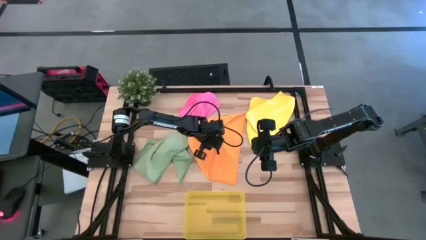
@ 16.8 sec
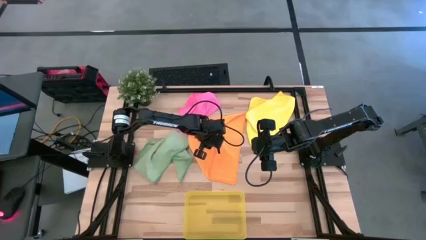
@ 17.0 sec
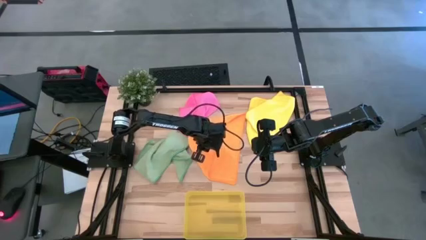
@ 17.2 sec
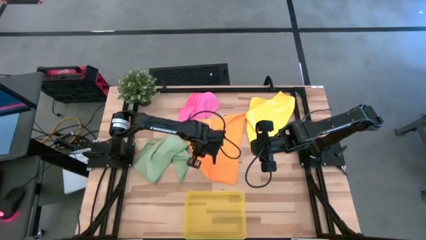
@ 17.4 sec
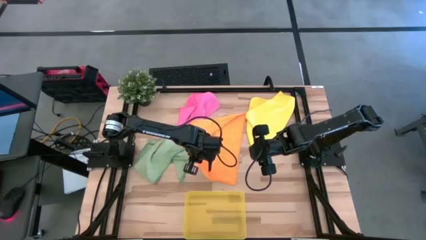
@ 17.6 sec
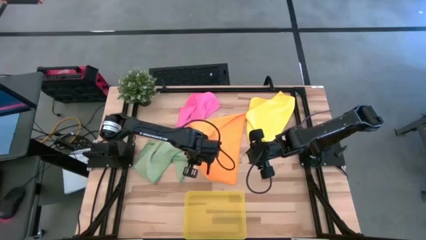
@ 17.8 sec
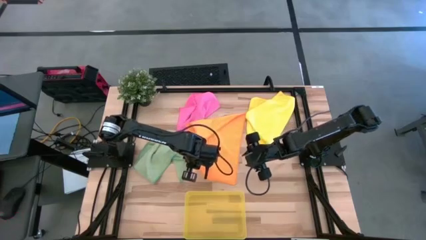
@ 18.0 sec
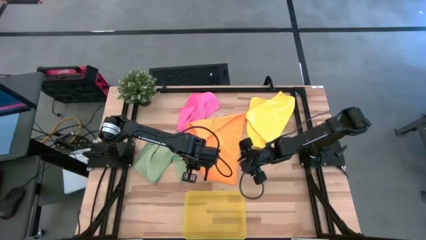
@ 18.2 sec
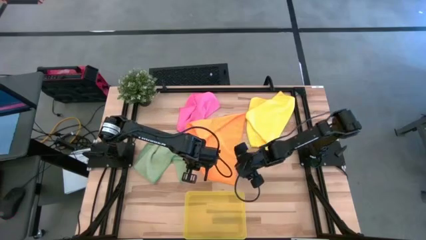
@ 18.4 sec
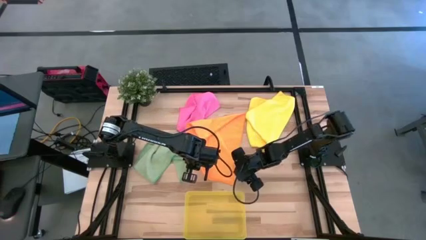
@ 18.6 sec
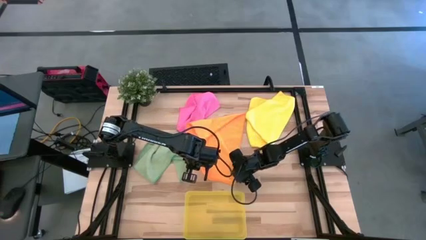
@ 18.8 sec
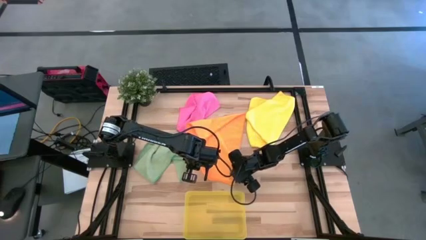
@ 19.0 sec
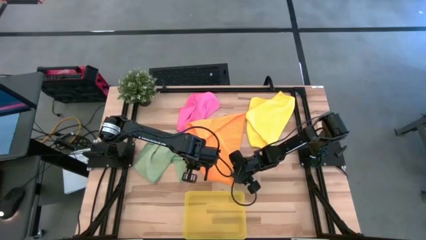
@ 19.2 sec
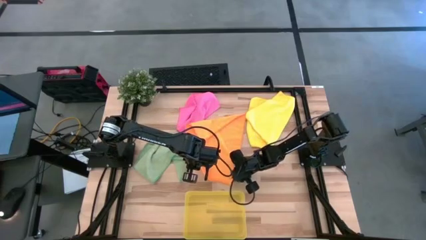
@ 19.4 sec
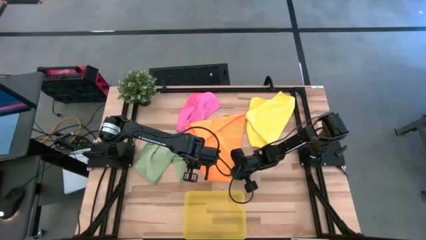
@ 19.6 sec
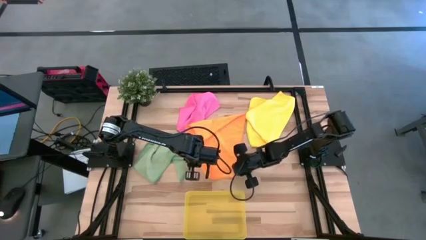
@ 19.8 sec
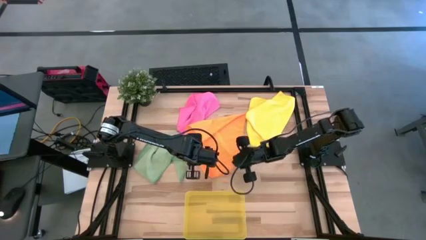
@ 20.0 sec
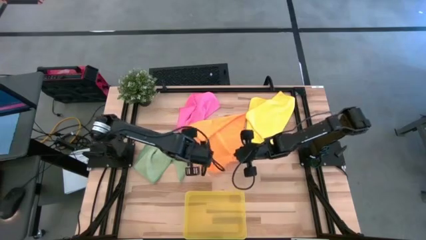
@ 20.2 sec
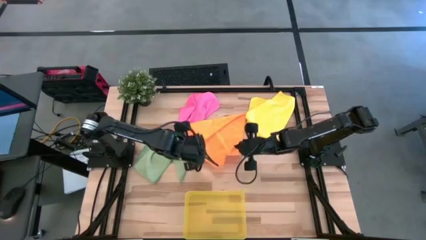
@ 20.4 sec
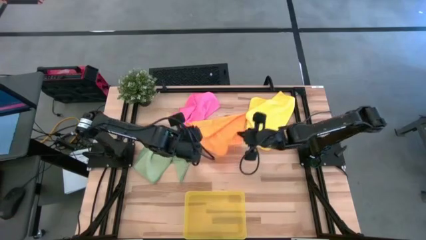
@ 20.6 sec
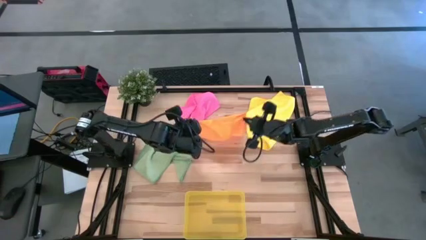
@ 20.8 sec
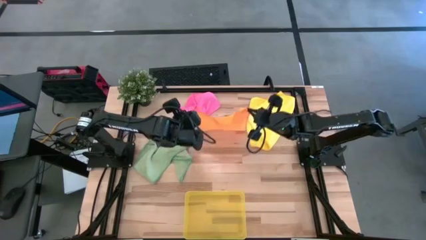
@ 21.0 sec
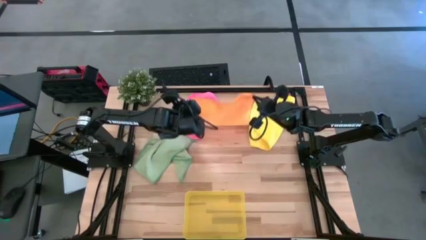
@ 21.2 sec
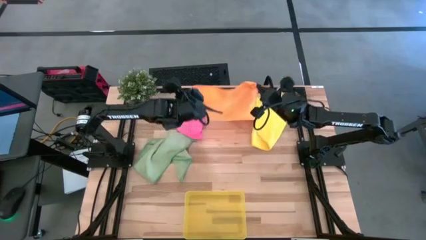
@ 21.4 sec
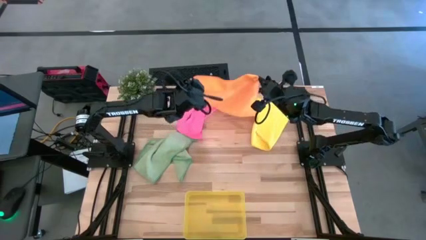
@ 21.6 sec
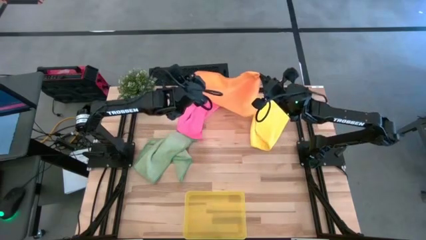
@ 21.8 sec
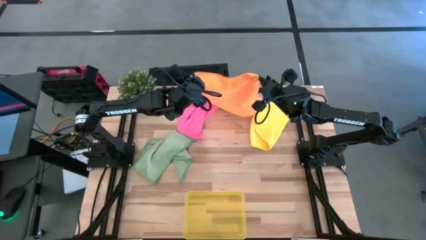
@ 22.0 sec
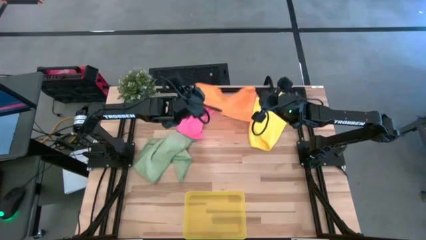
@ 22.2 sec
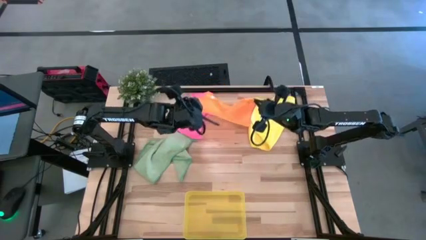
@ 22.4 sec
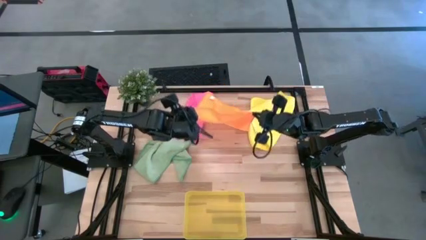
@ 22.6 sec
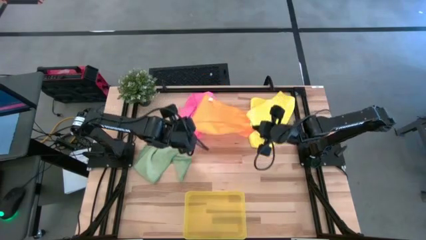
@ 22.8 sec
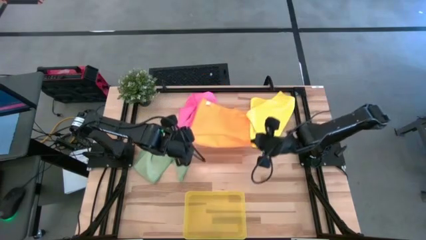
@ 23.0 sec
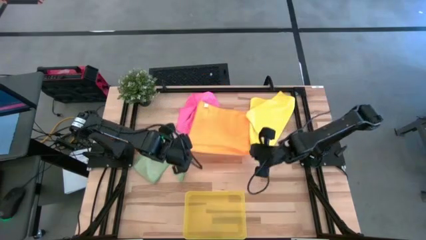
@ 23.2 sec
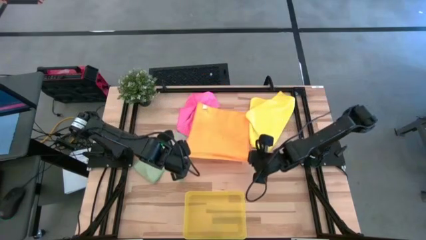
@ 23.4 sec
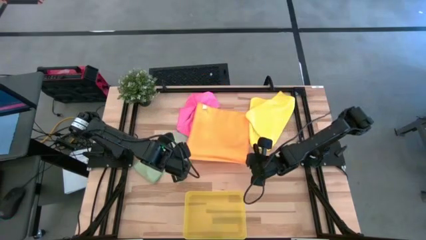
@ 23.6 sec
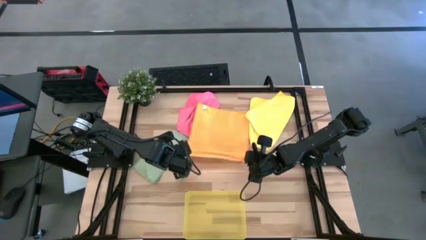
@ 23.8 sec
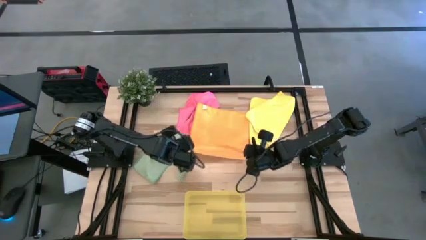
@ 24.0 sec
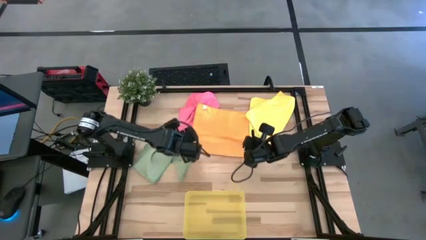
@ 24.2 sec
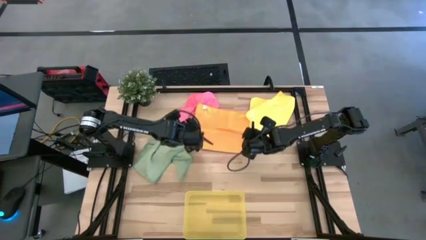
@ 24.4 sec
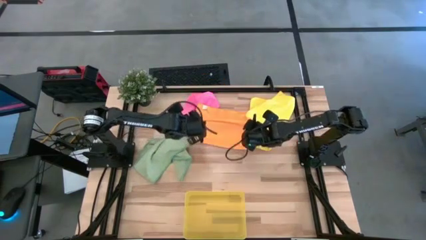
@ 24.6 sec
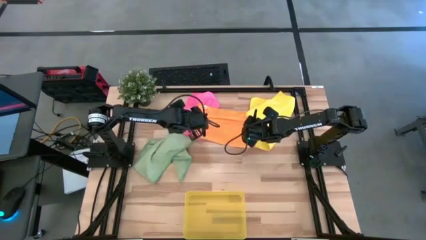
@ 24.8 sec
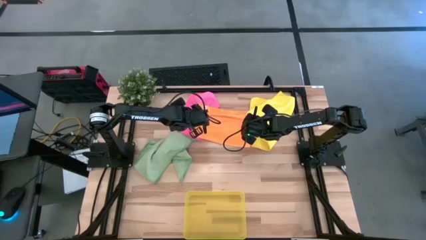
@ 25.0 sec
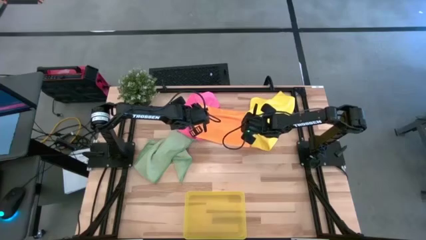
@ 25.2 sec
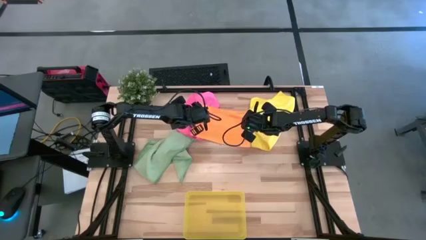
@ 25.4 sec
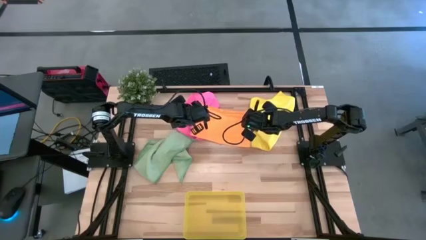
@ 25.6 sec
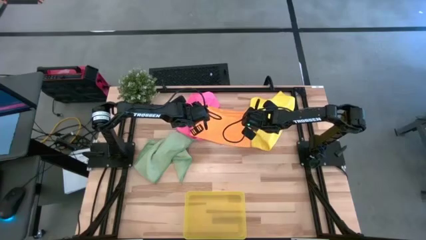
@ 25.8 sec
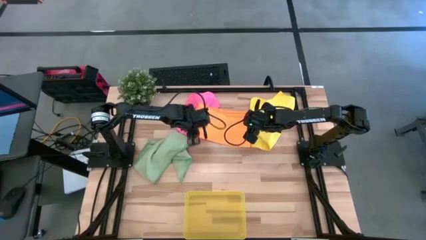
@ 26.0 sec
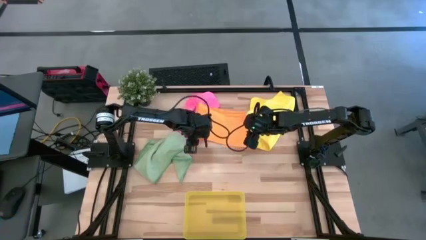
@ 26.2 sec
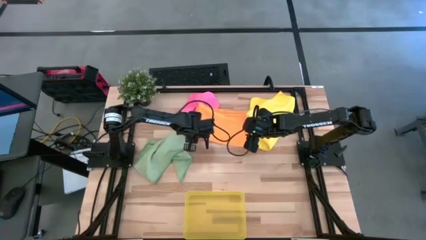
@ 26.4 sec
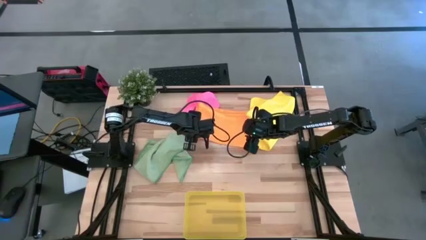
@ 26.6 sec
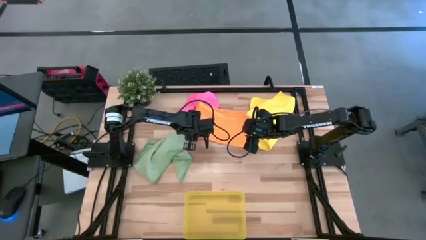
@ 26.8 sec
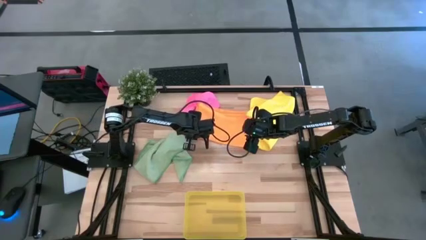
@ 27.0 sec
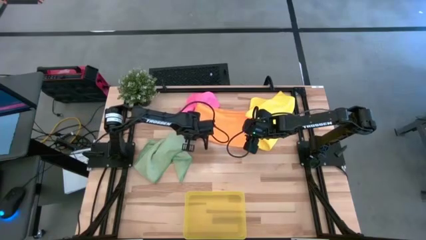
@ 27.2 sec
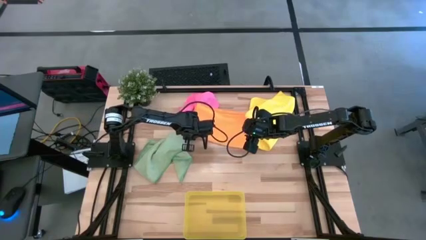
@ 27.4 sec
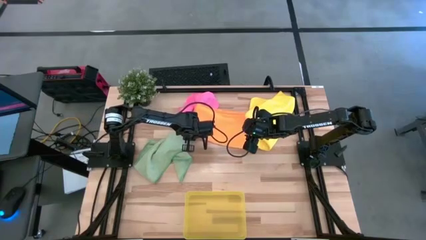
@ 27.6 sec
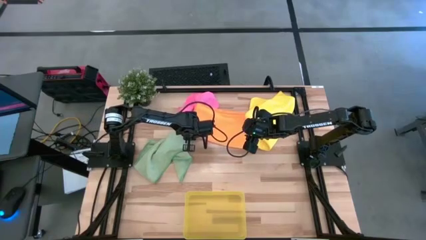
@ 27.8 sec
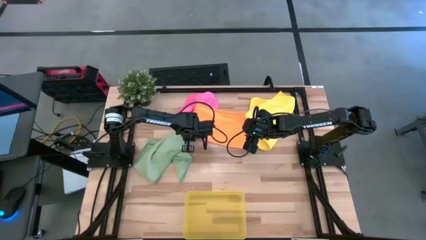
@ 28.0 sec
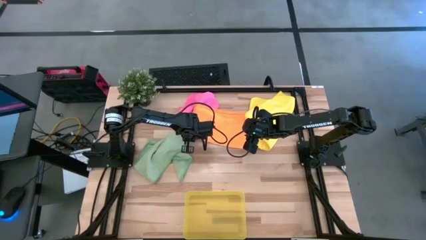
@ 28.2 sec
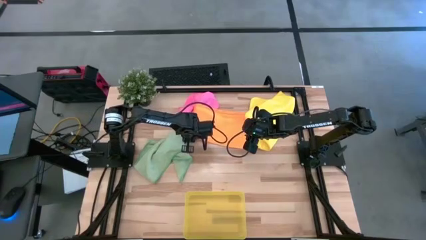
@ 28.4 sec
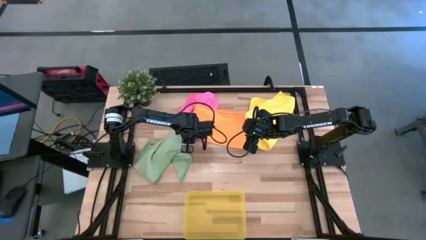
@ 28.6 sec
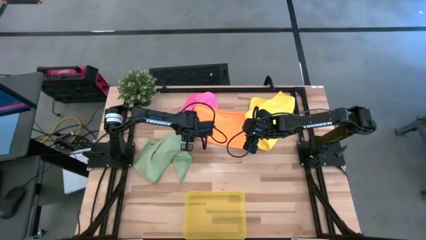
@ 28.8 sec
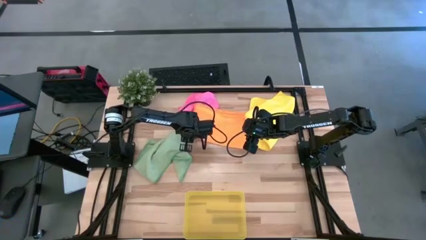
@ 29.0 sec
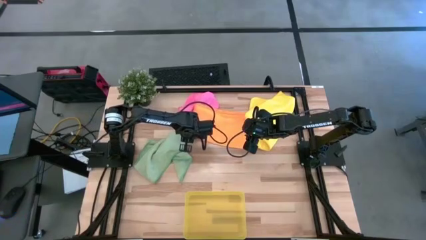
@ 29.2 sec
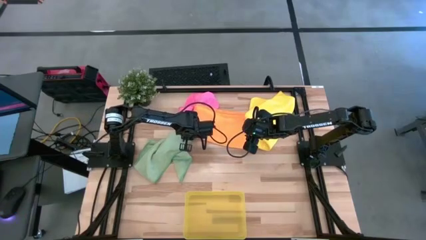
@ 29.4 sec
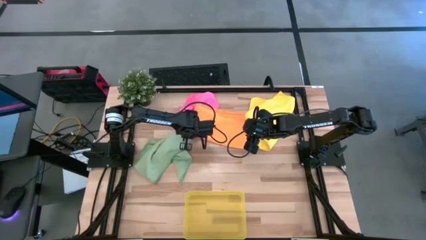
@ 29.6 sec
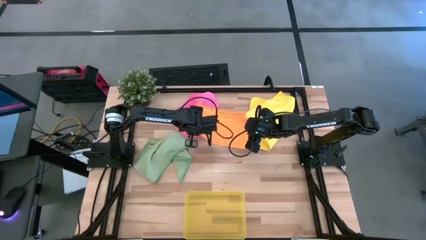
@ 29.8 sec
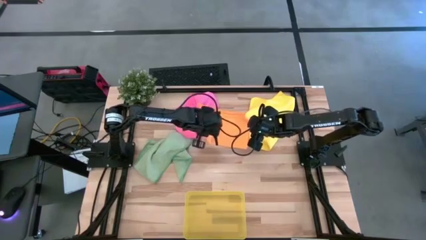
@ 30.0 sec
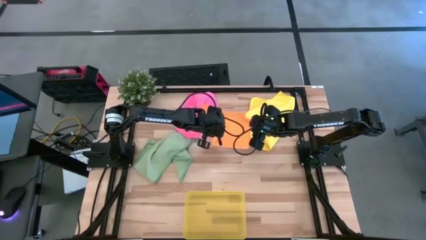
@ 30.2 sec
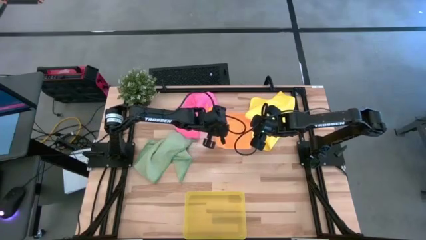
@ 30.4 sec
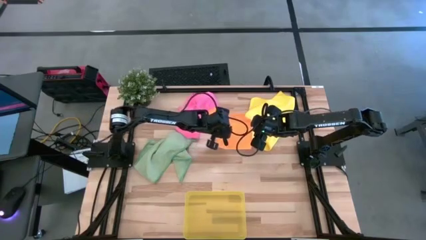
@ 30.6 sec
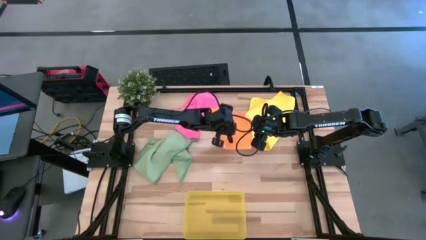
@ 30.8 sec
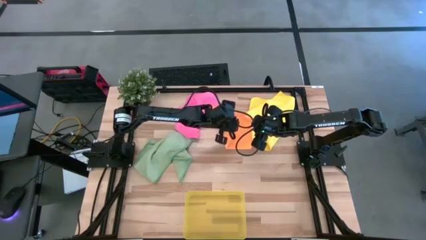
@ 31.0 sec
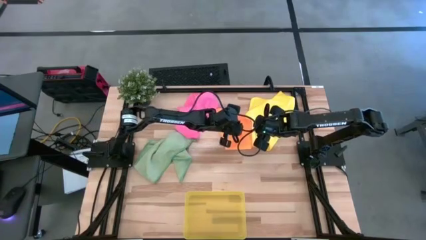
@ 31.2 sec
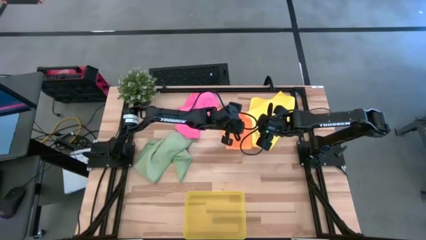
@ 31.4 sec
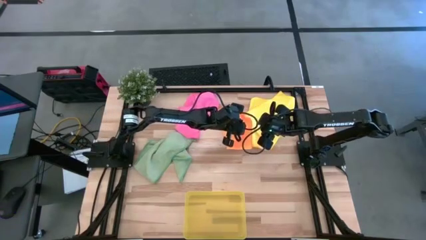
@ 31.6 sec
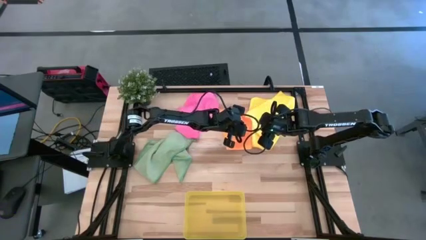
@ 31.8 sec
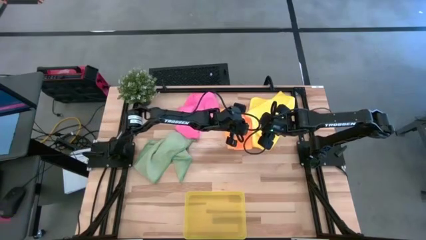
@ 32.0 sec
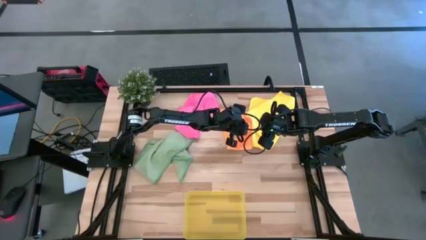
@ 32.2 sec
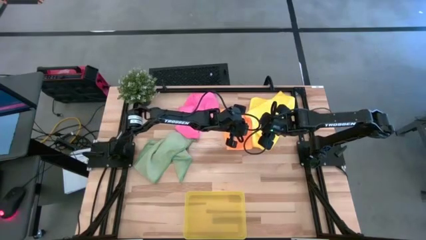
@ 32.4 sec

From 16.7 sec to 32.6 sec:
Task: Fold microfiber towels
Fold the orange microfiber cloth
